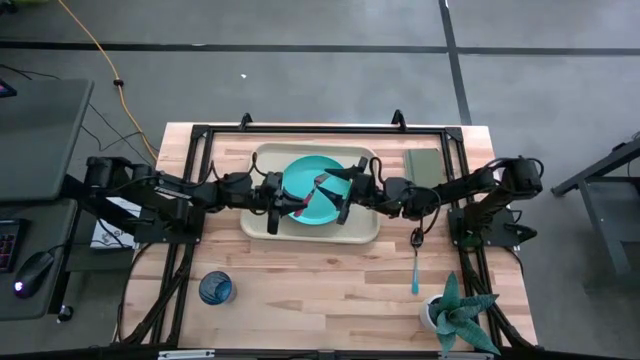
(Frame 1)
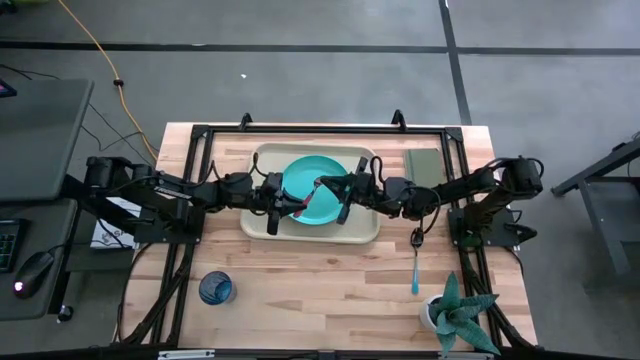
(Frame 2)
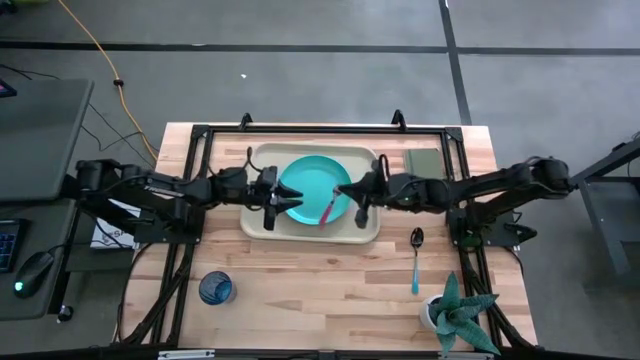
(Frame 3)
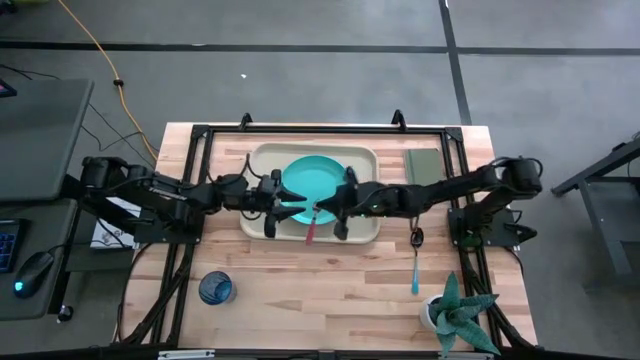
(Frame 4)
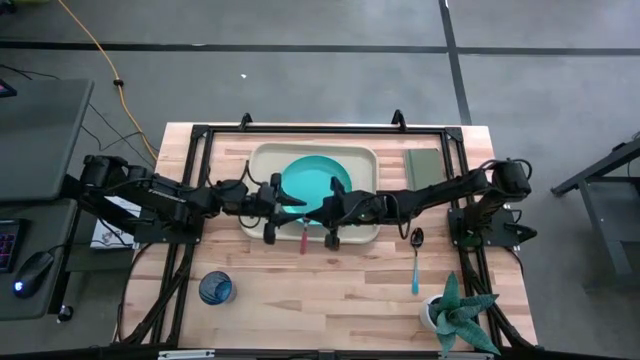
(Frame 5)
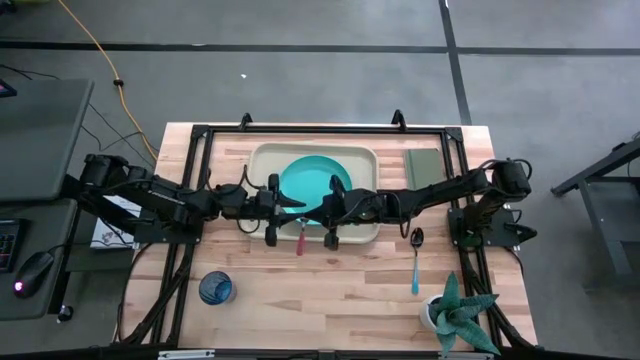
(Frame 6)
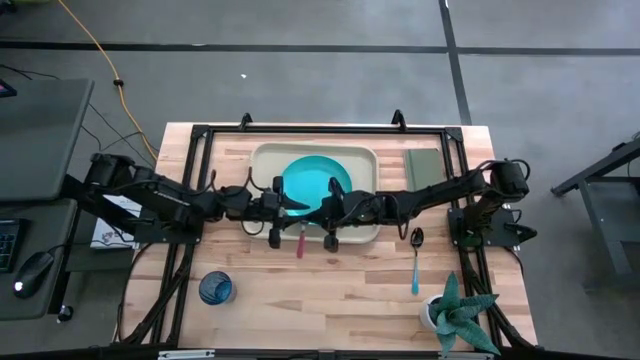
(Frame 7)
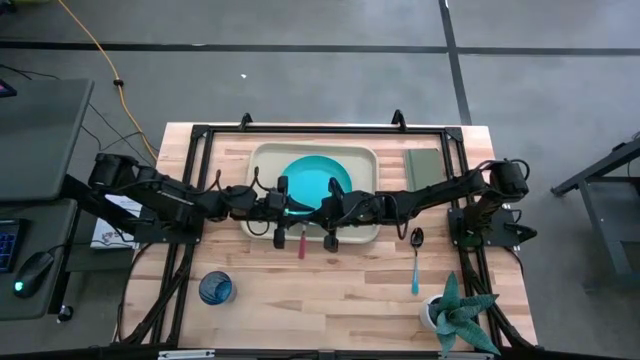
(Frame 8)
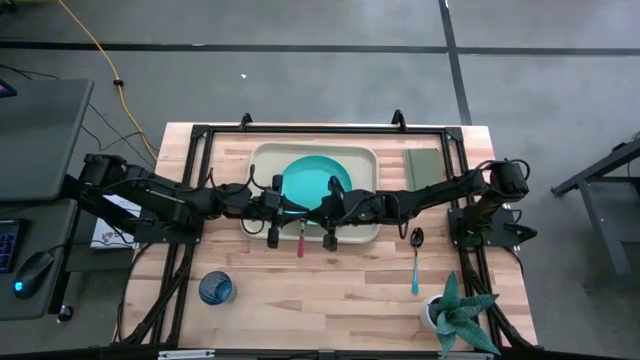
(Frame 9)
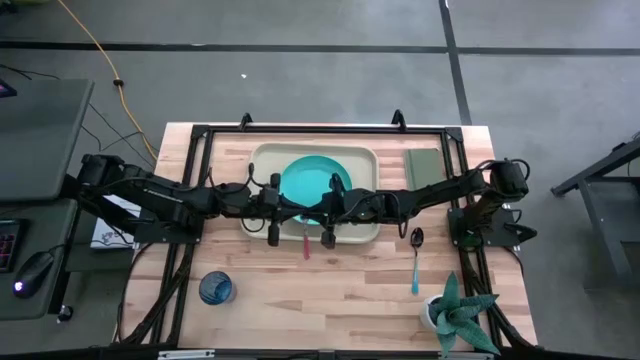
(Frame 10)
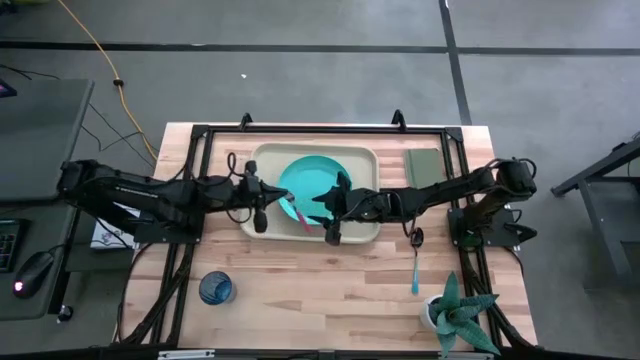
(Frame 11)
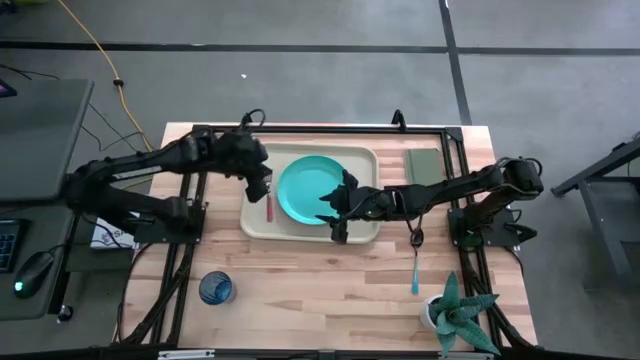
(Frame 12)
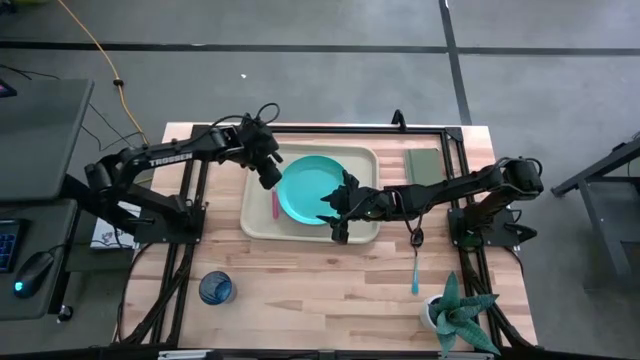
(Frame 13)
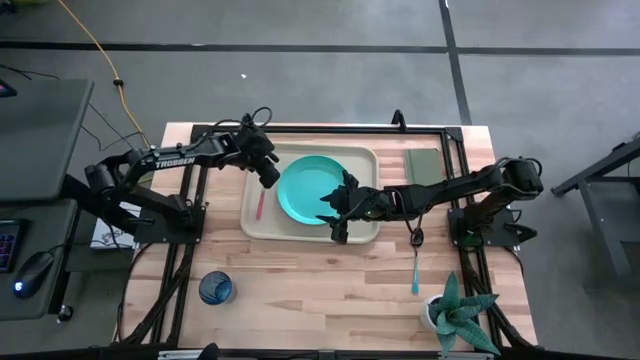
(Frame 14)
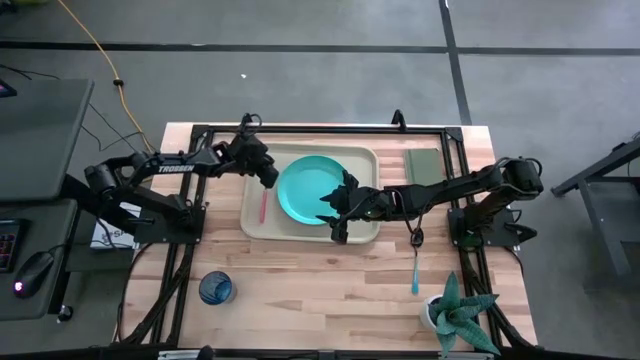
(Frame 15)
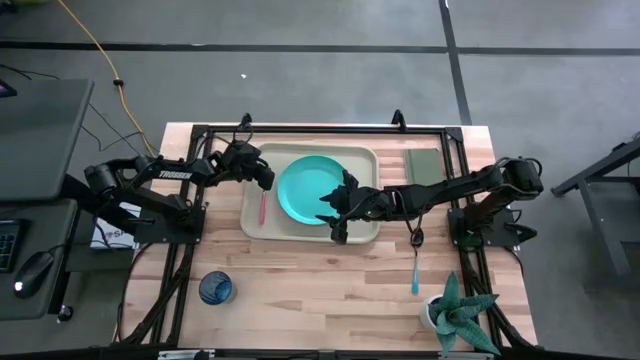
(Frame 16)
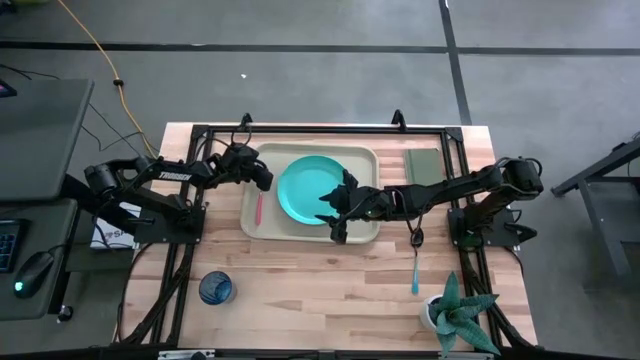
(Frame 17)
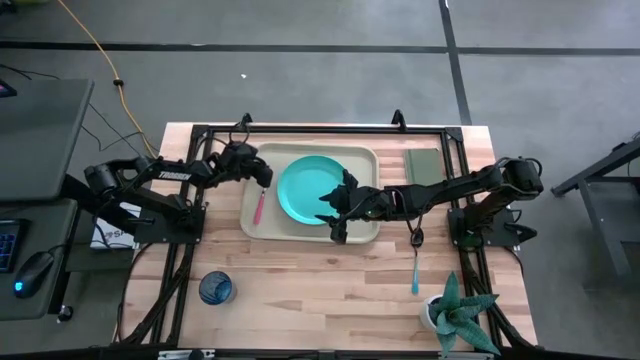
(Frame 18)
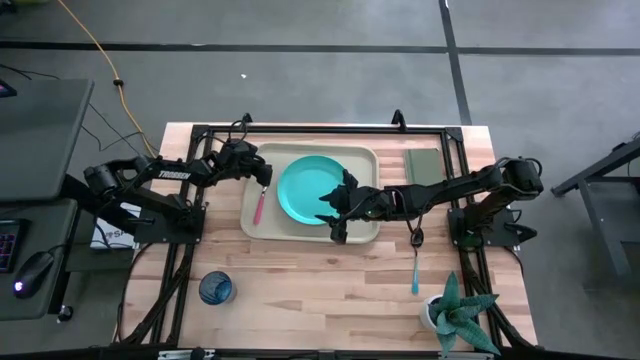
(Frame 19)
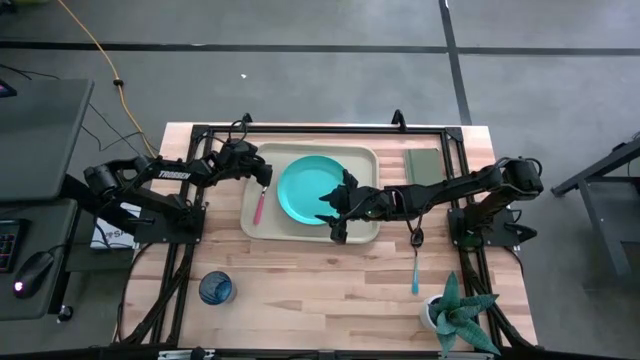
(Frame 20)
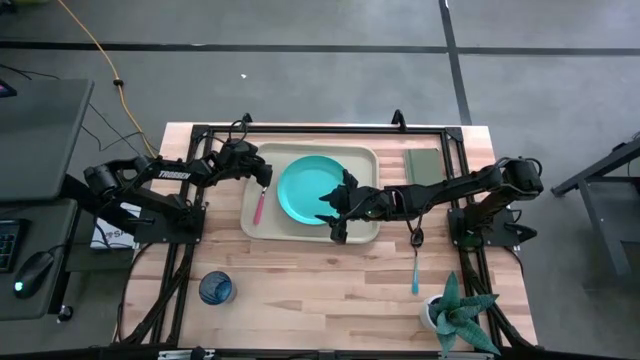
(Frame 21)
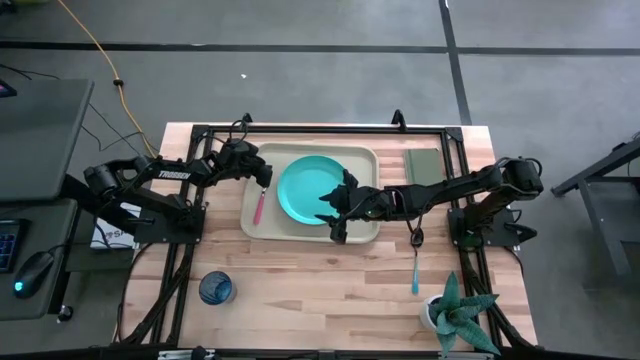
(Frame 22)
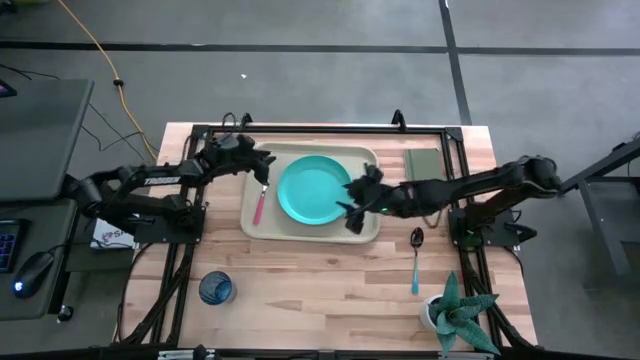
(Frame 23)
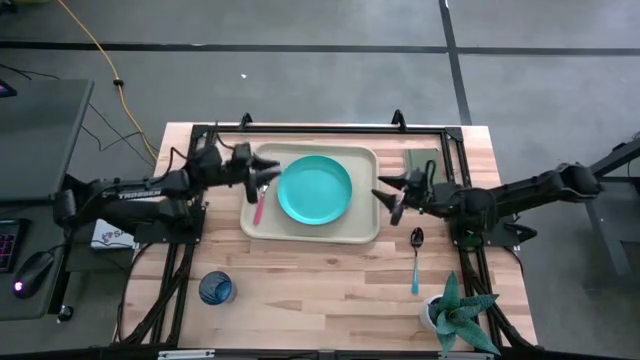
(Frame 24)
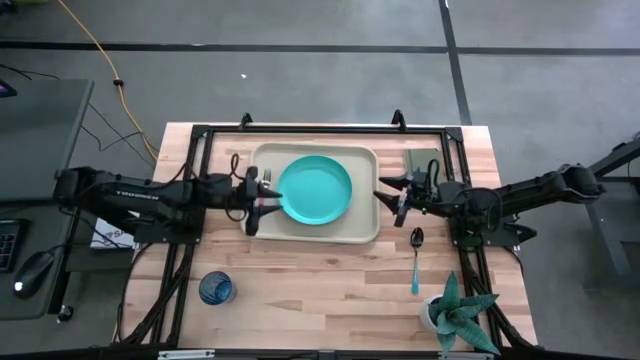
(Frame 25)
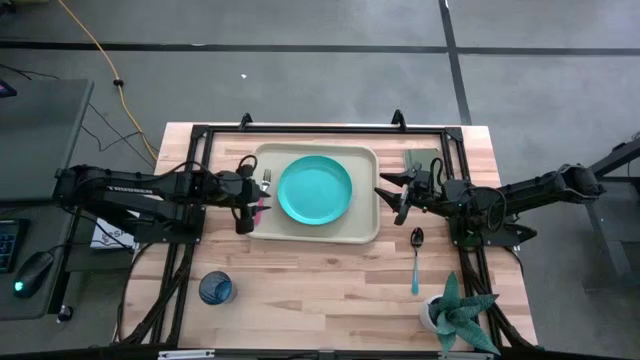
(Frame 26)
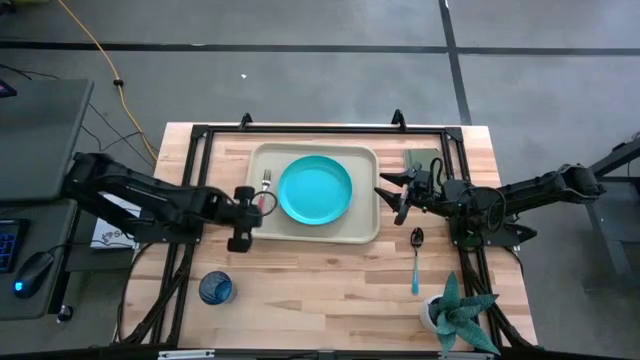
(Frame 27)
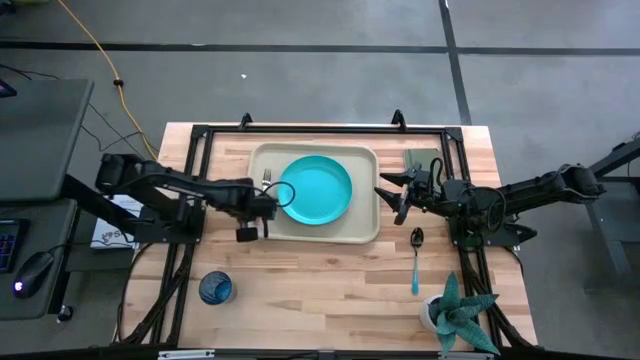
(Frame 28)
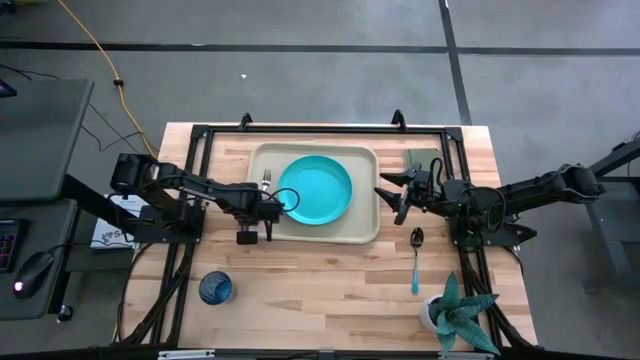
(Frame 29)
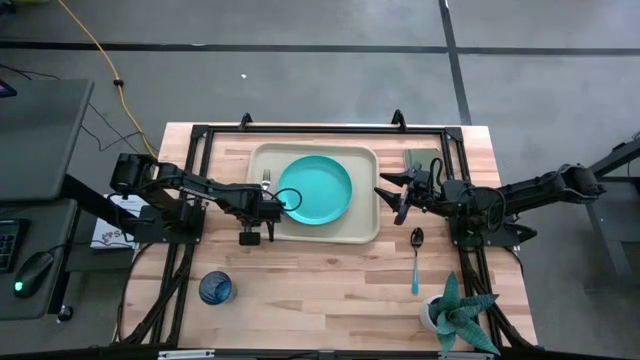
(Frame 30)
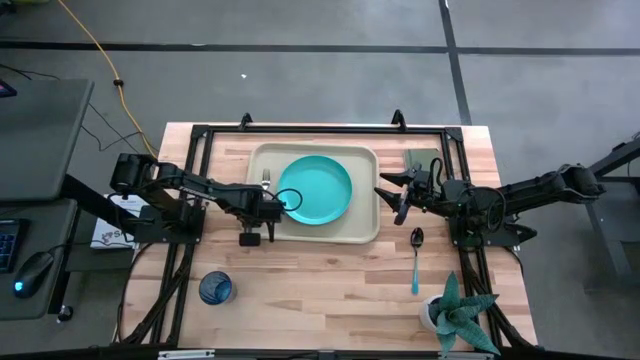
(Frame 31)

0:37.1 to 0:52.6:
Task: Pick and place plate/cup/fork/spoon on tray
Put the pink fork to the left of the blue plate on the light brown tray

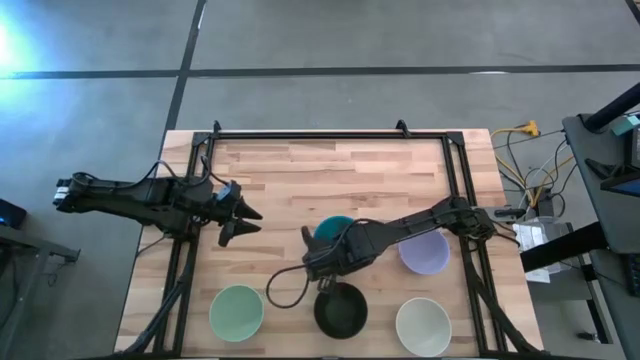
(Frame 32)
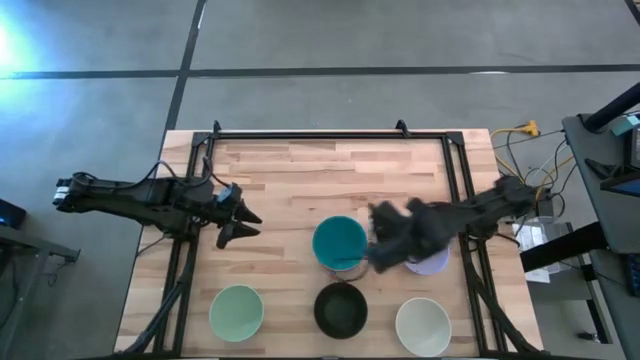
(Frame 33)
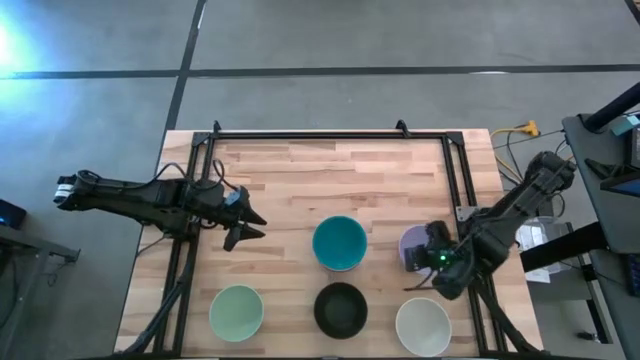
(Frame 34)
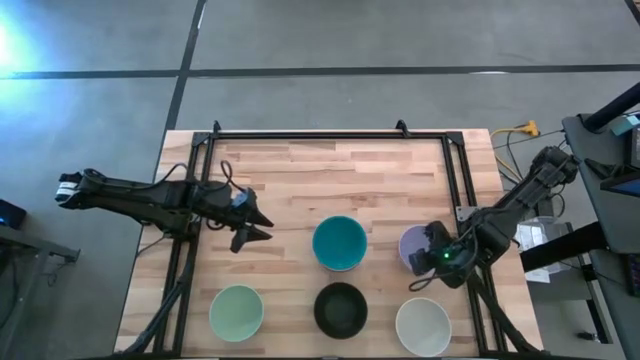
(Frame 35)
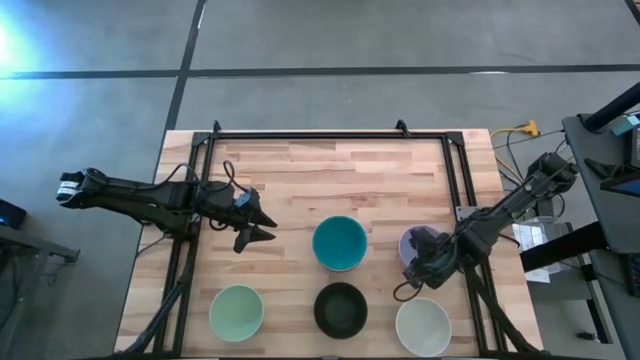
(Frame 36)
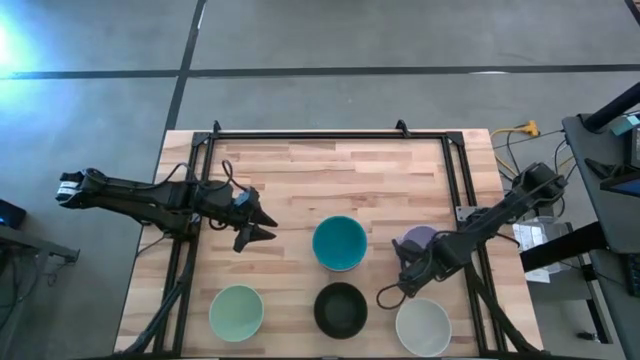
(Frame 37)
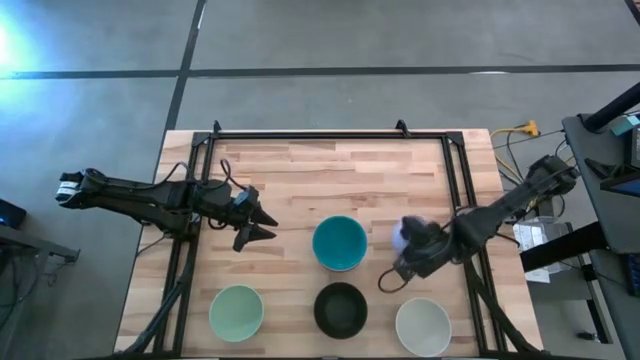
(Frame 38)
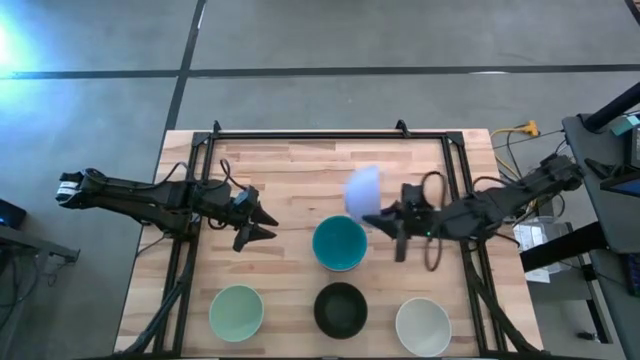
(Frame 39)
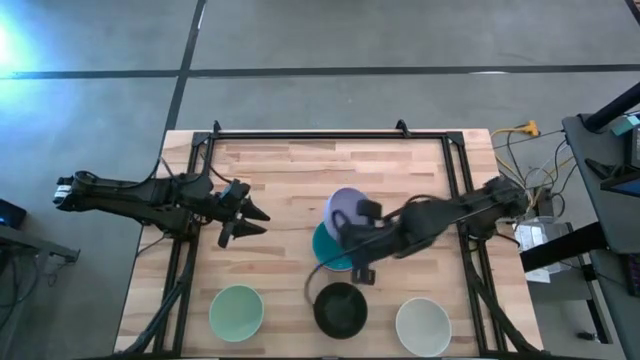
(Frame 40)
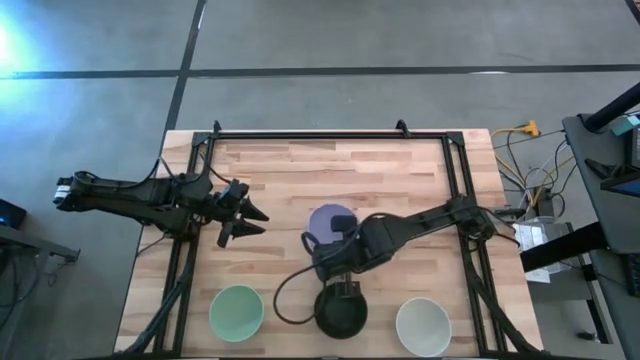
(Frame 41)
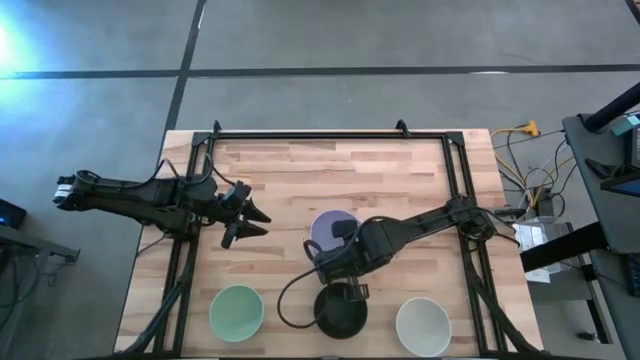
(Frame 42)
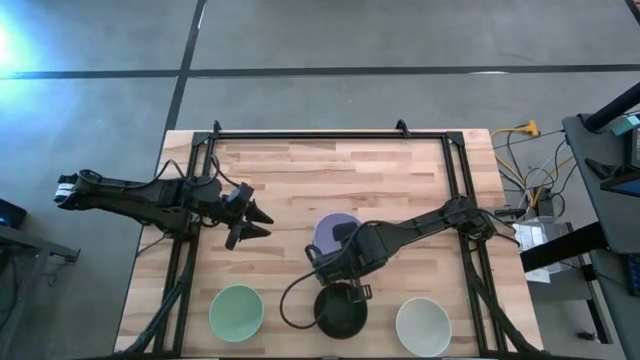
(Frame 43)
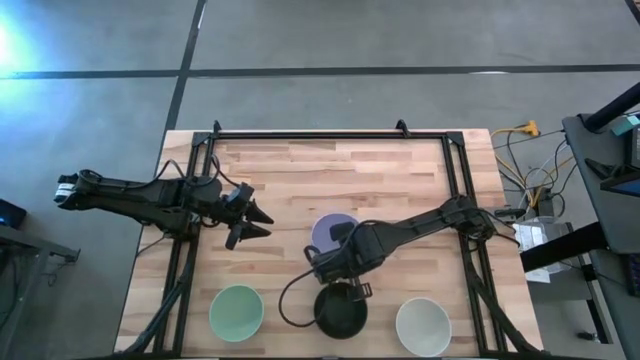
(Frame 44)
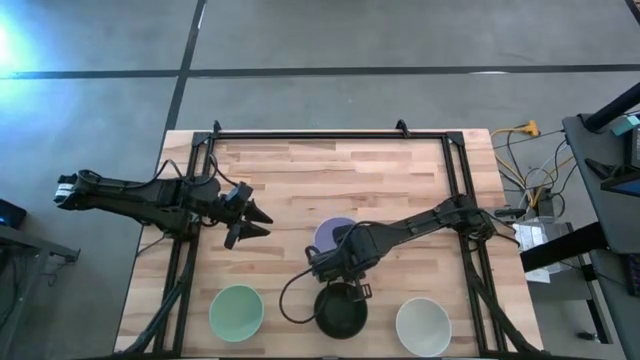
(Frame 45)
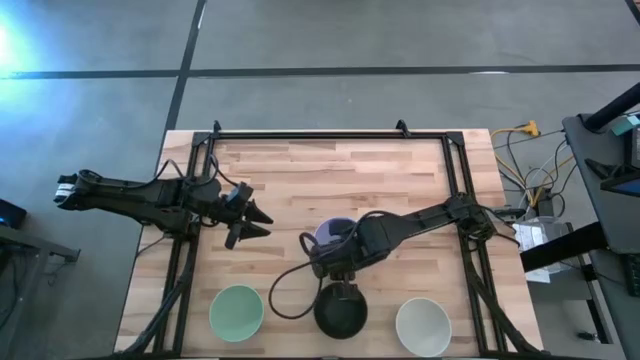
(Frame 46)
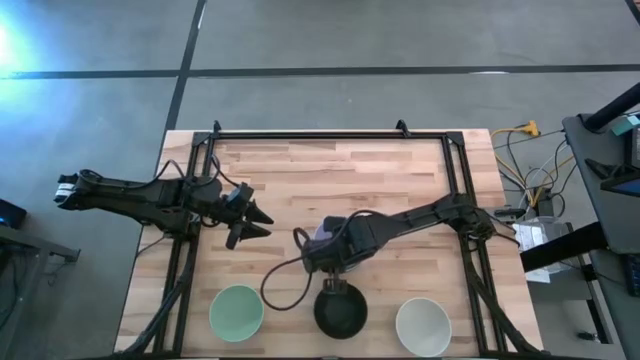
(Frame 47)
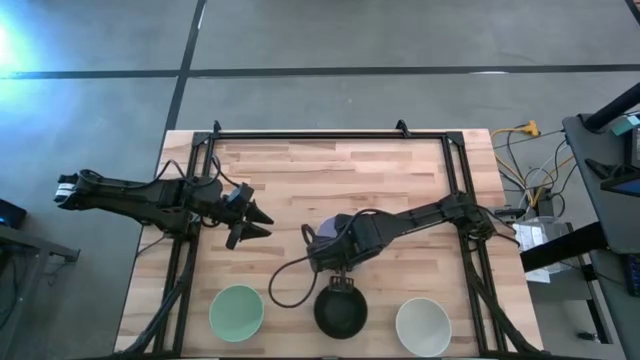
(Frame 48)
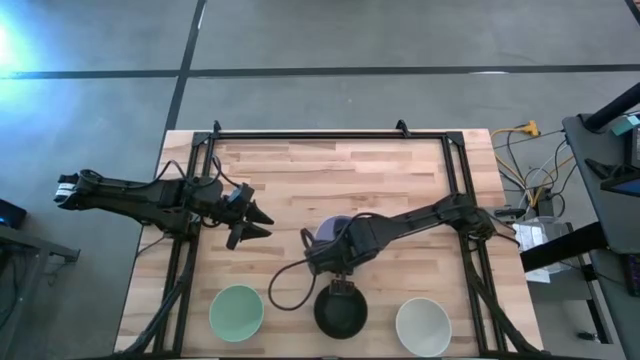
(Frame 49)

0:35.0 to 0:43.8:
Task: Nest bowls inside each other
Stack the purple bowl on the dark blue bowl
